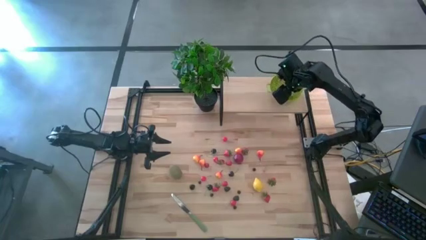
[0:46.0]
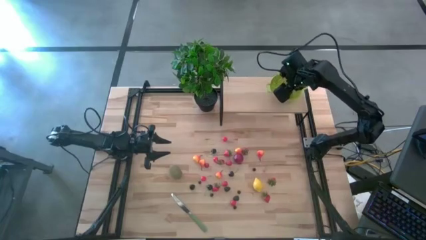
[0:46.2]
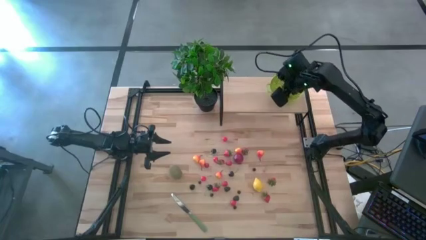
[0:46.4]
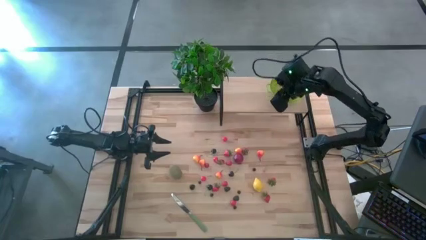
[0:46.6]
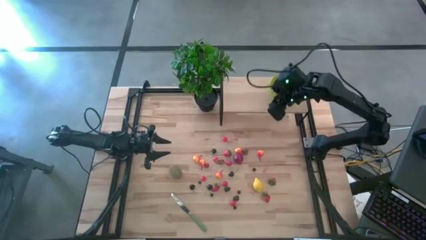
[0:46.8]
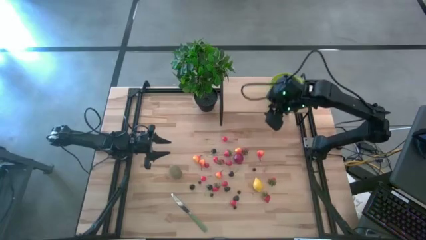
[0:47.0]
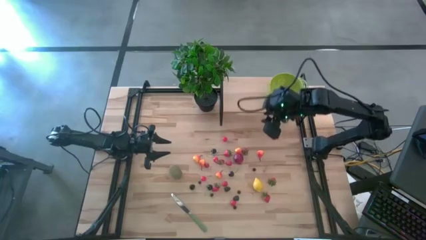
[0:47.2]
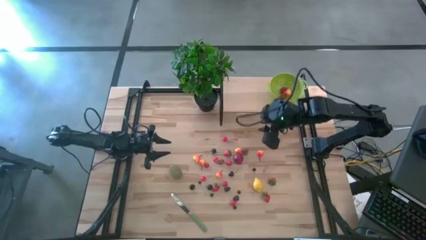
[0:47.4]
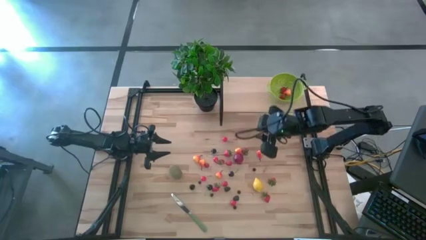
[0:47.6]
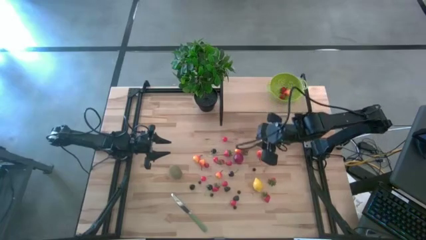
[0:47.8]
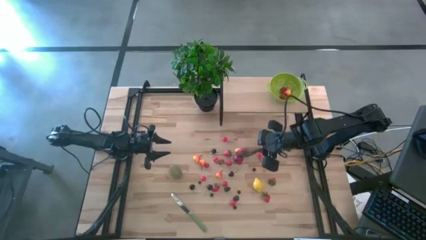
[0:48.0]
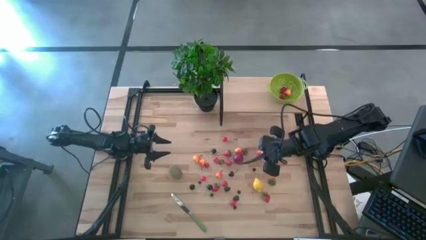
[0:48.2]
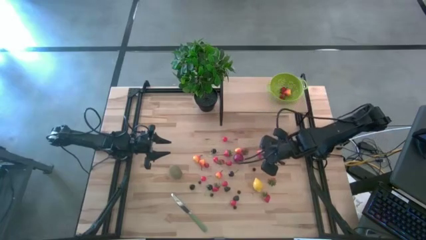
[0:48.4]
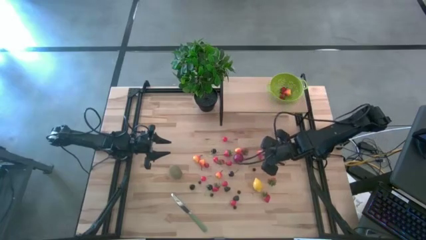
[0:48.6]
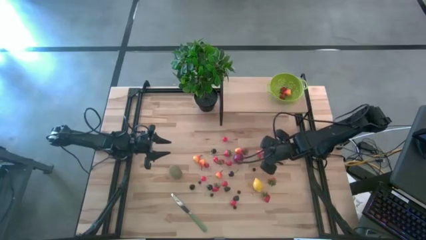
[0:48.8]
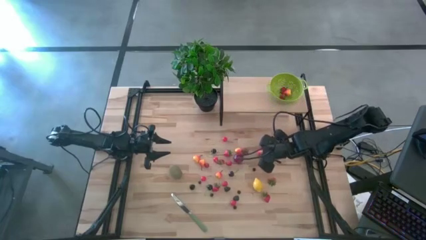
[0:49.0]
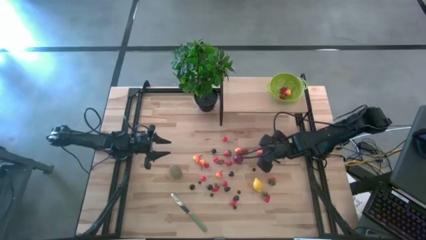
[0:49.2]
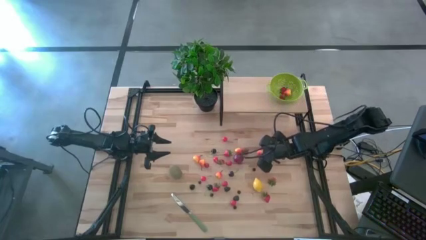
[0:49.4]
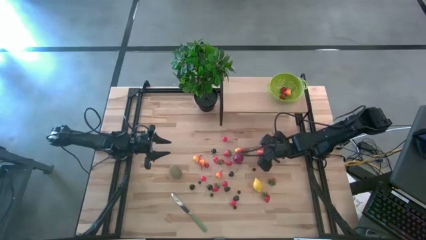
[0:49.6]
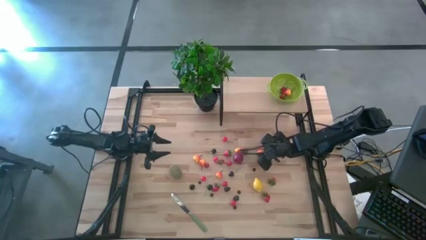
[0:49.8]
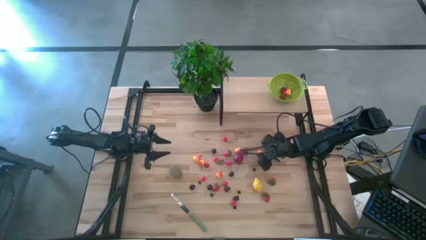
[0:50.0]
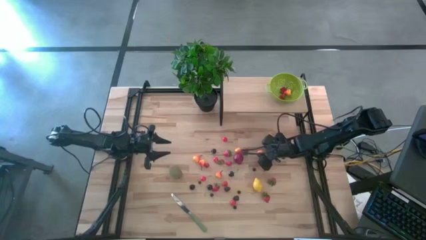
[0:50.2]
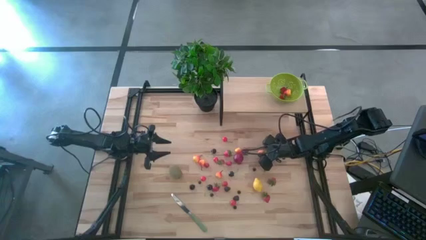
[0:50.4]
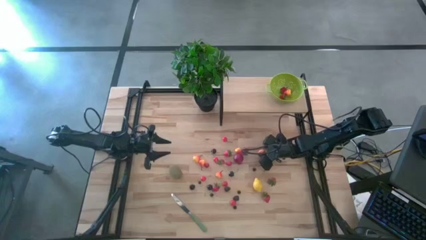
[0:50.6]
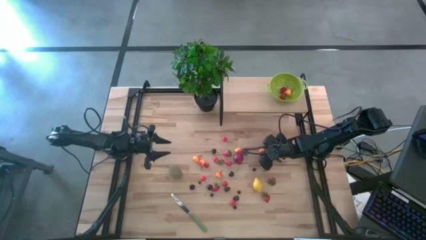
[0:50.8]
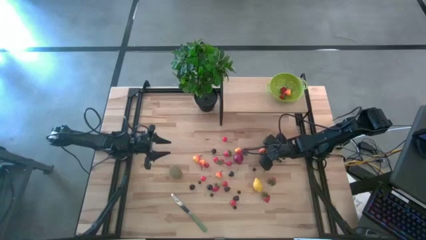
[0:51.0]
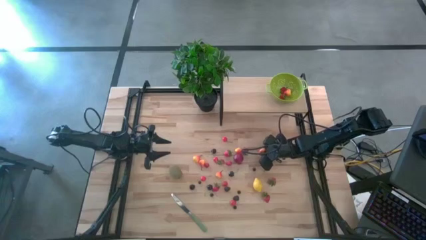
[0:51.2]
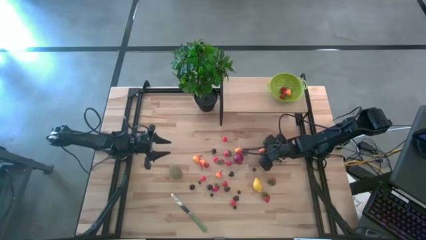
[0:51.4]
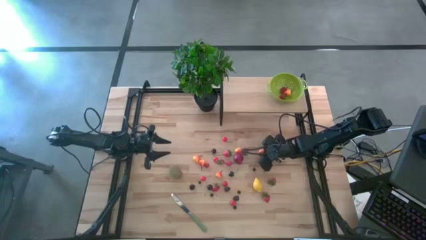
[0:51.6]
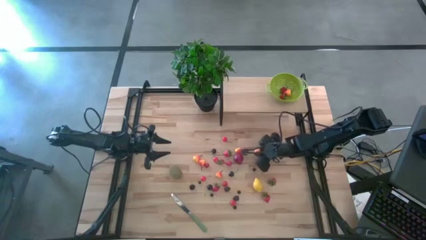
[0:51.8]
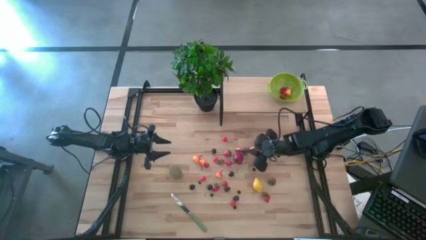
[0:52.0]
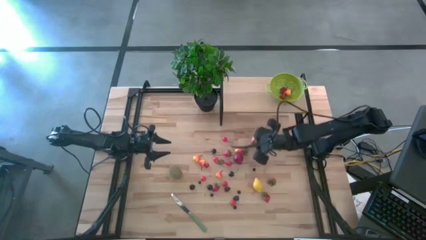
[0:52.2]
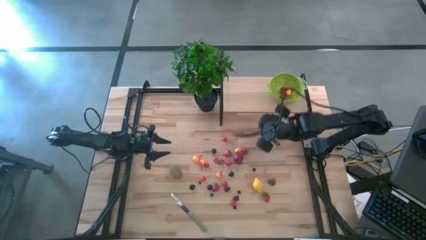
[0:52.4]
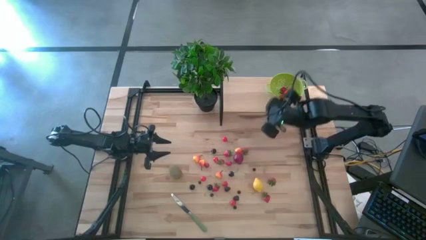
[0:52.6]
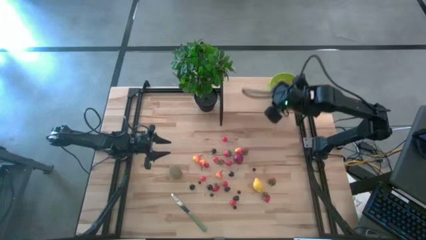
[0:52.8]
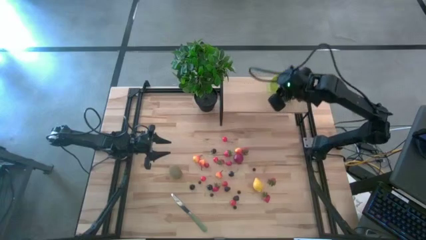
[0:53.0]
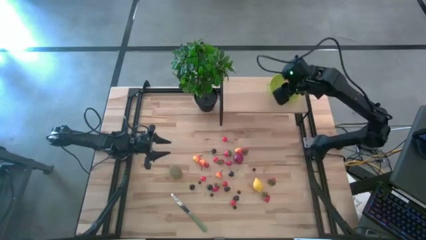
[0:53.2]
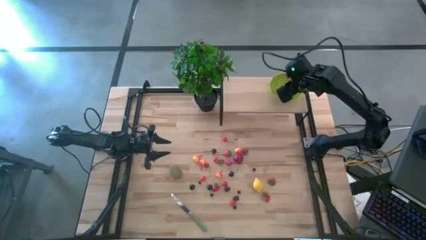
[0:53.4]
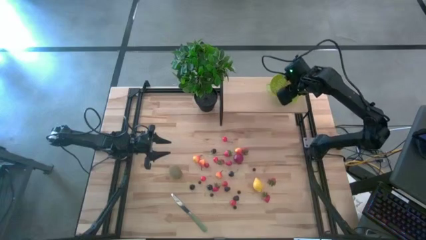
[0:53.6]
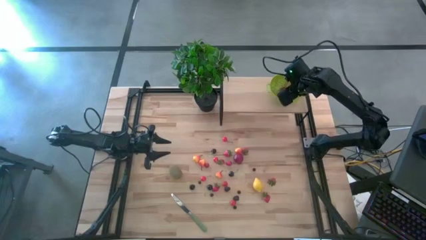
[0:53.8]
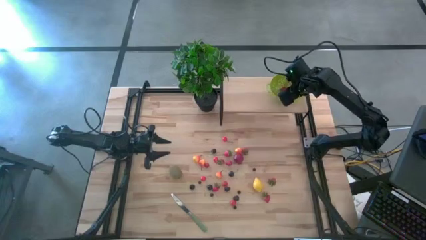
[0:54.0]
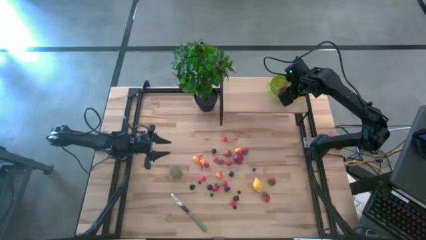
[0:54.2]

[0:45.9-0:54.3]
Task: Pick & Place Fruit
Put the pear into the green strainer bowl on the shelf

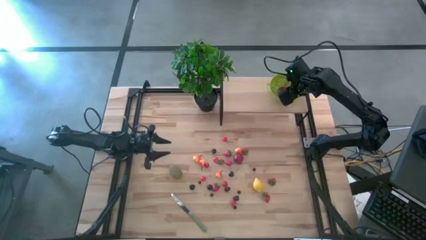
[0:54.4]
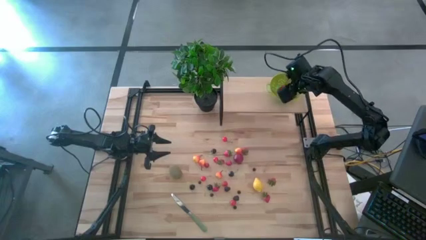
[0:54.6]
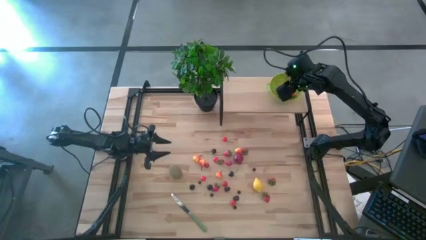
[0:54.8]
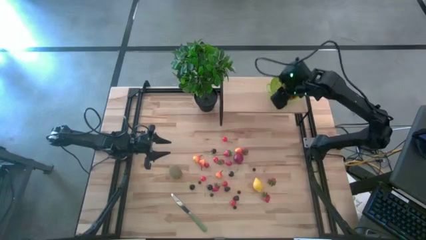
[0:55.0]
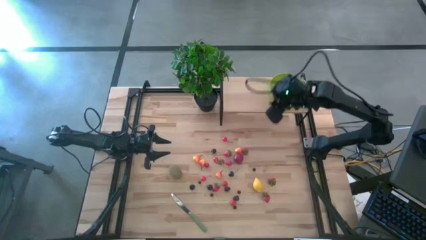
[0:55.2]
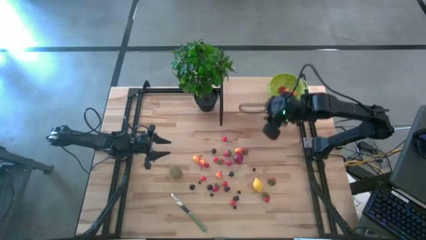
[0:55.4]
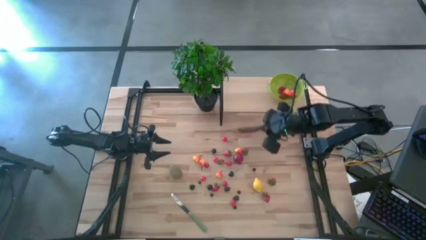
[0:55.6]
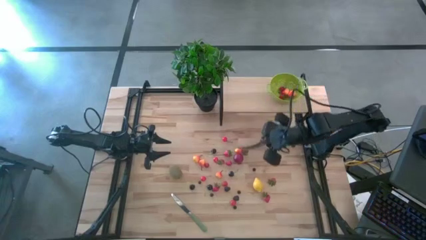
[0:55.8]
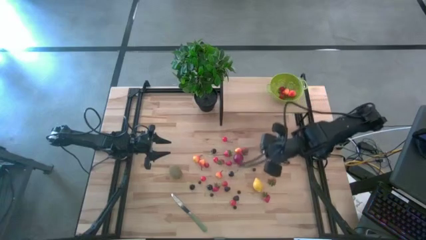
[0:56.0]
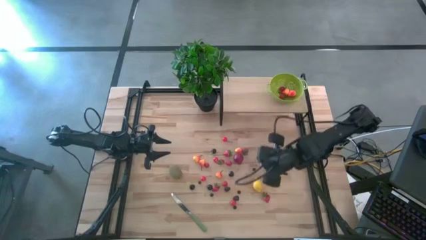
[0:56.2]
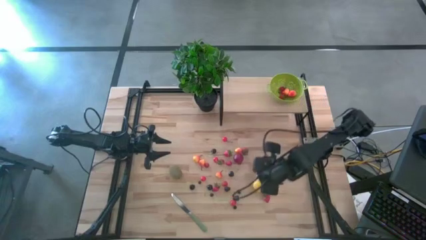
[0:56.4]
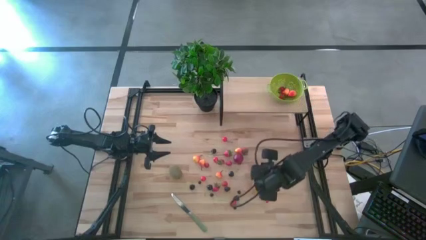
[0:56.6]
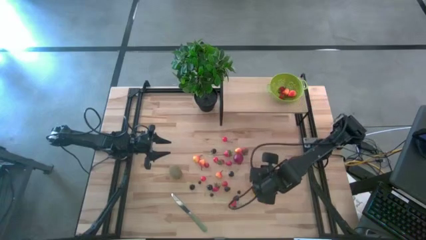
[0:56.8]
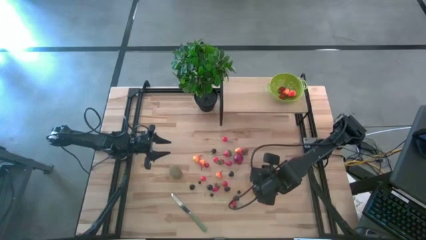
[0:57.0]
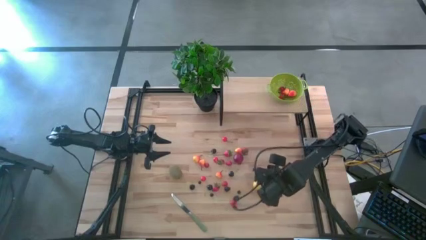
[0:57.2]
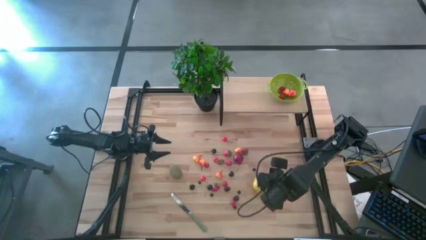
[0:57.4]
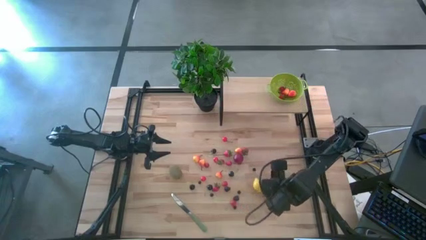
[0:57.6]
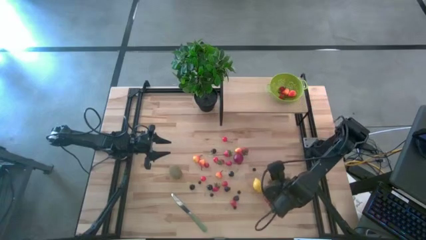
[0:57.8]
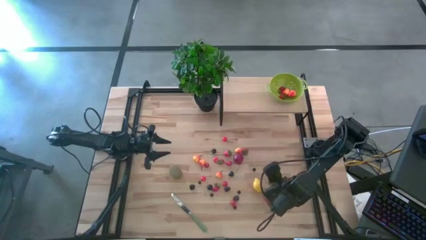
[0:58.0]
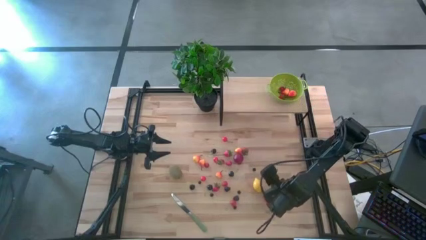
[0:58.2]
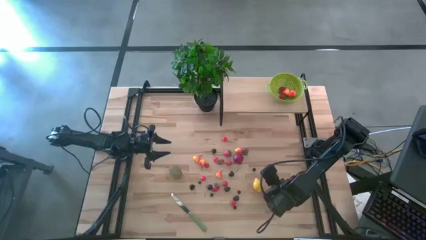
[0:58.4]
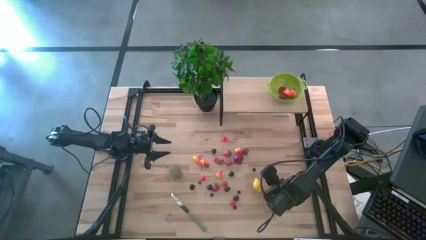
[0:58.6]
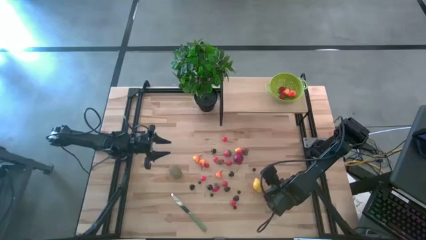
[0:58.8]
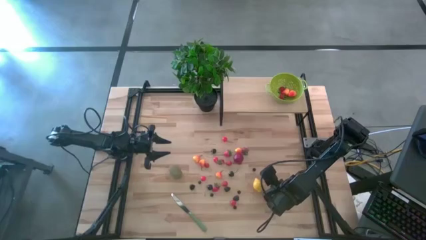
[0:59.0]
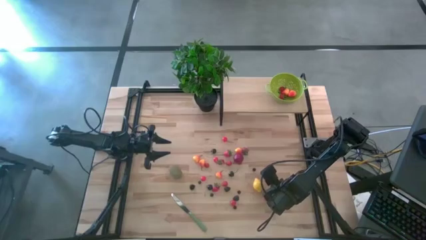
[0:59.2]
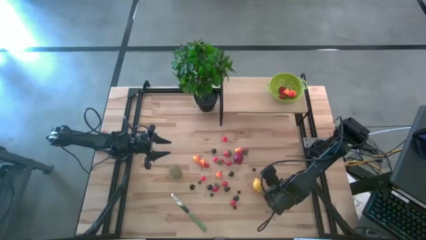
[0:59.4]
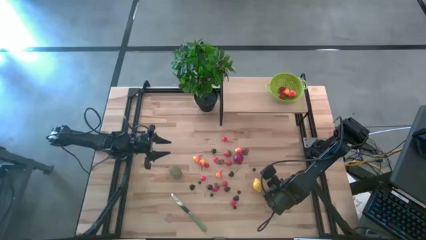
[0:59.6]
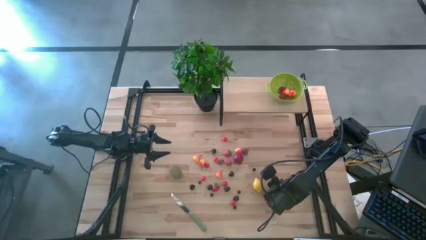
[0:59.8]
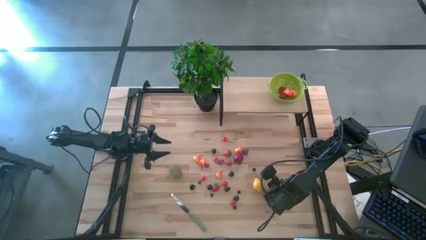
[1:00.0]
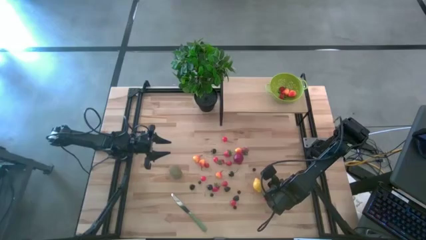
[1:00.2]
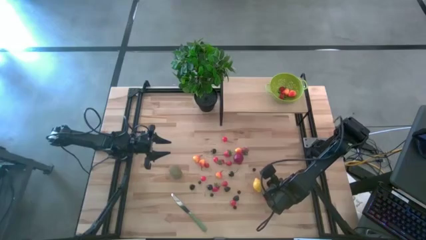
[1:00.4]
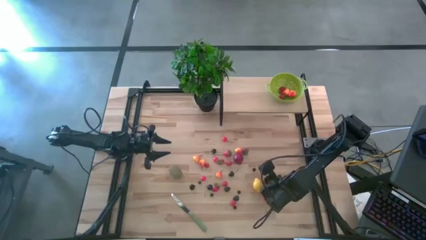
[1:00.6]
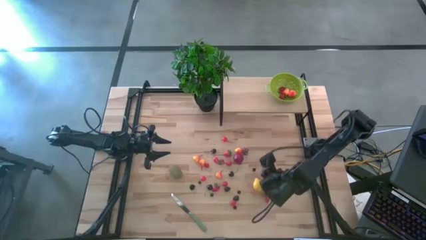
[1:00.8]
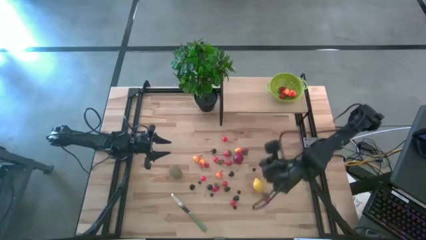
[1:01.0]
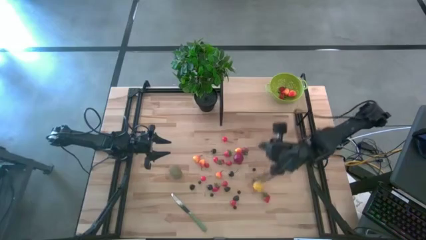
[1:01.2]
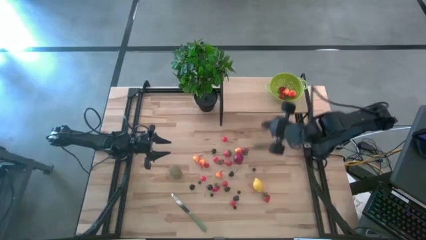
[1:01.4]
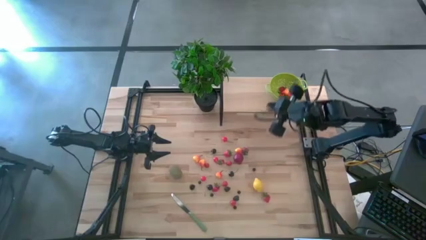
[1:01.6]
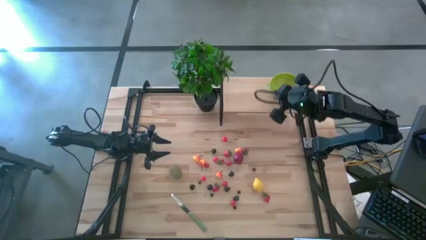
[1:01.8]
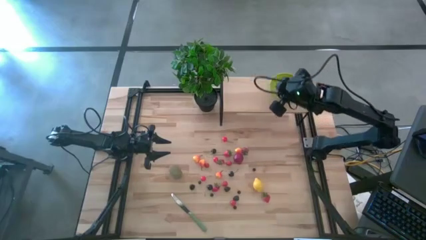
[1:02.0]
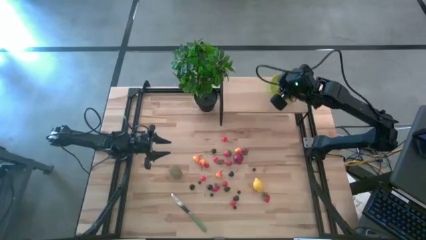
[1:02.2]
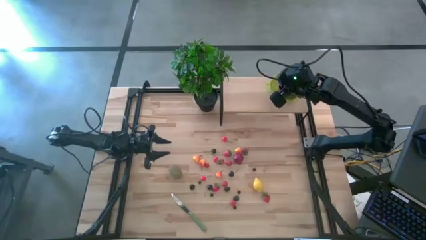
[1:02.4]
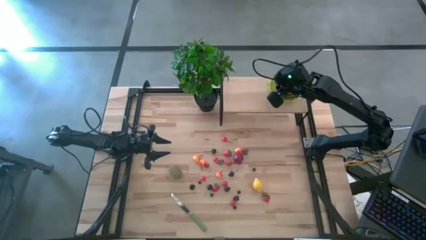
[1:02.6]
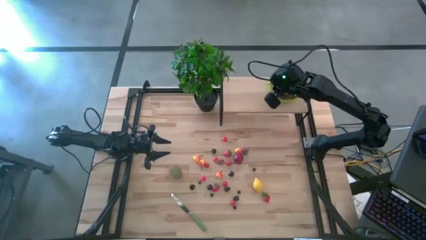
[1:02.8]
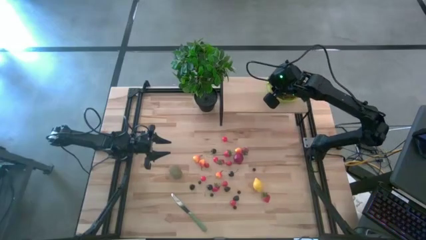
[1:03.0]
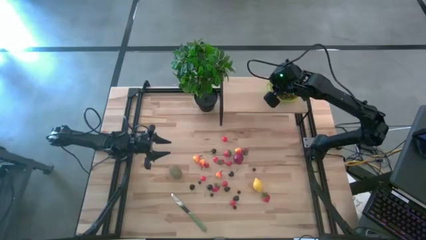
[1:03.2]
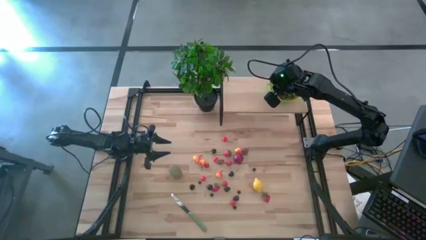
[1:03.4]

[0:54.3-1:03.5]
Put the strawberry into the green strainer bowl on the shelf
